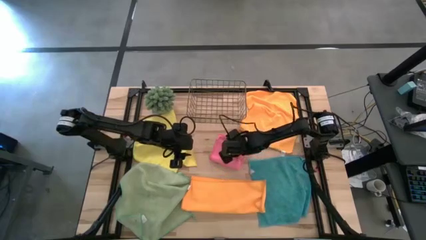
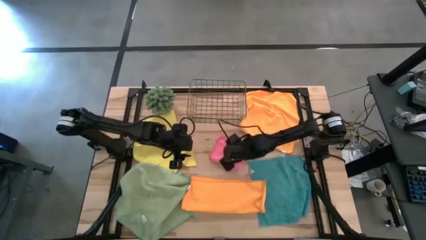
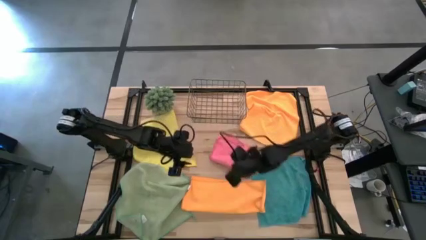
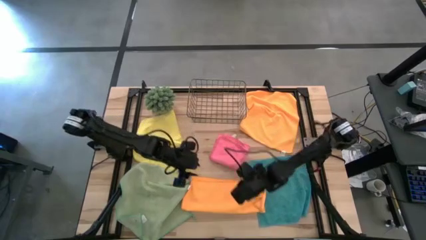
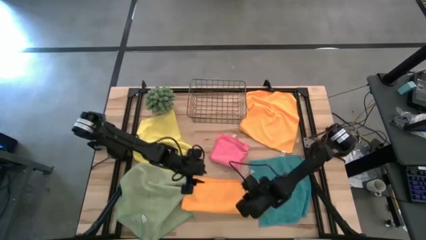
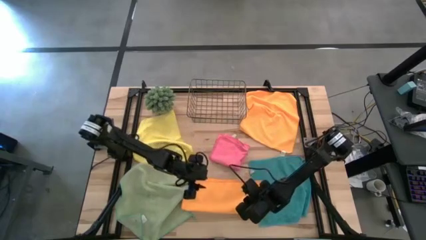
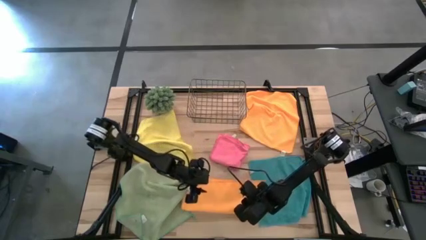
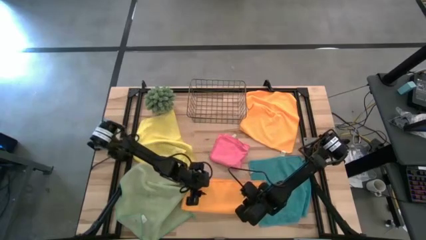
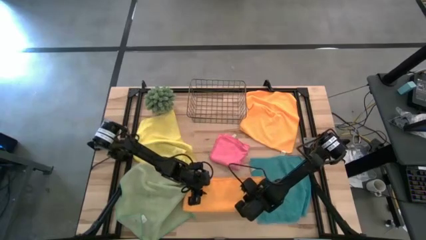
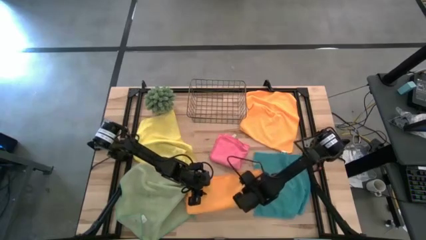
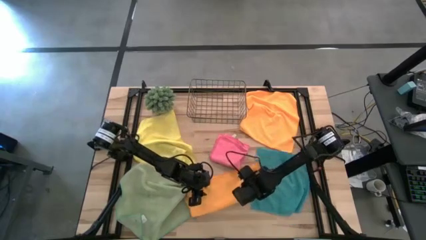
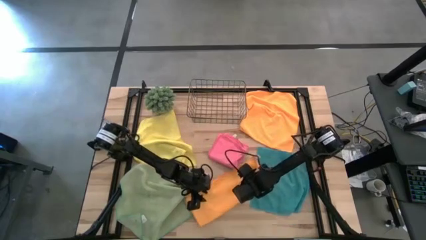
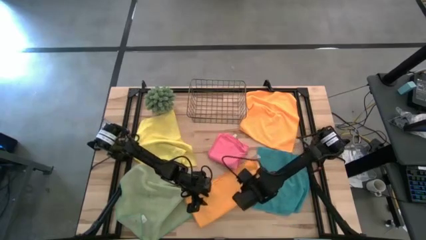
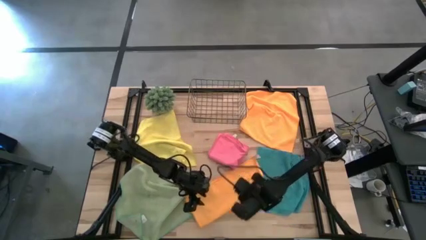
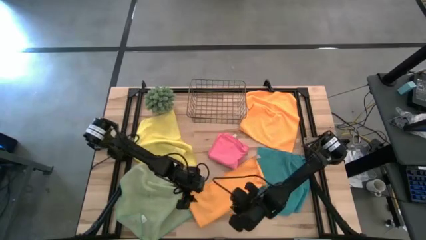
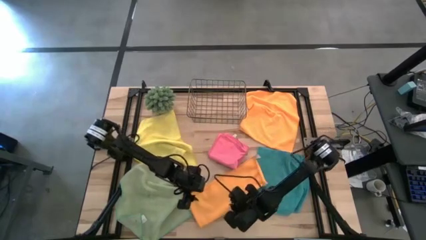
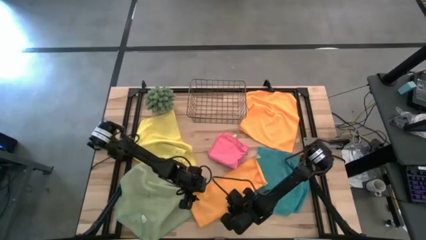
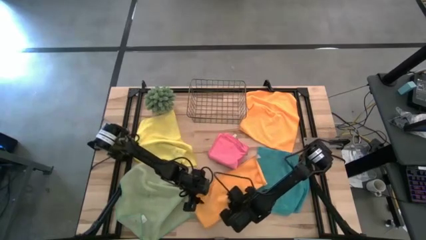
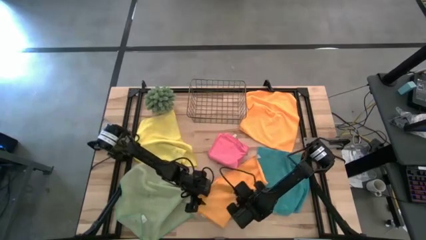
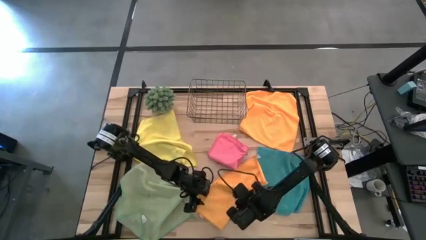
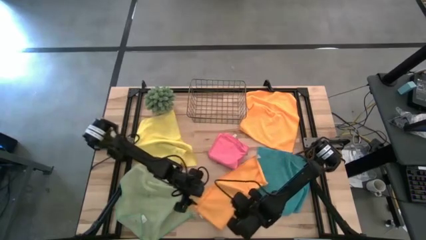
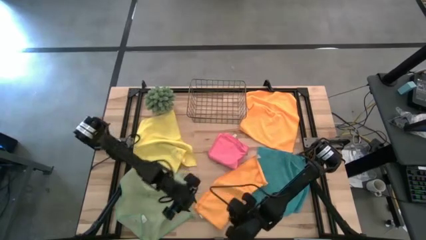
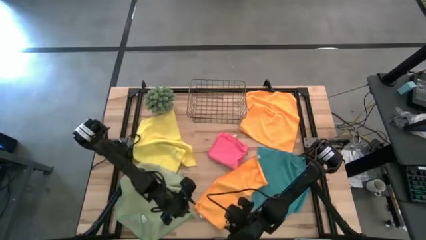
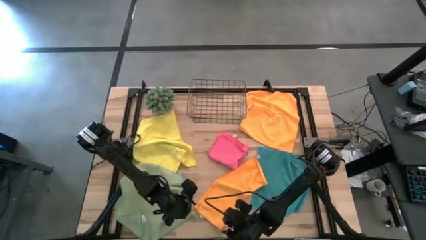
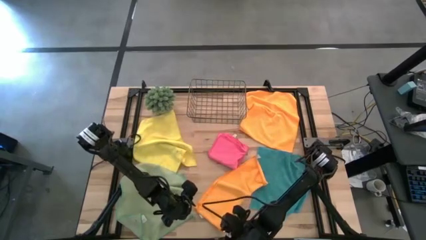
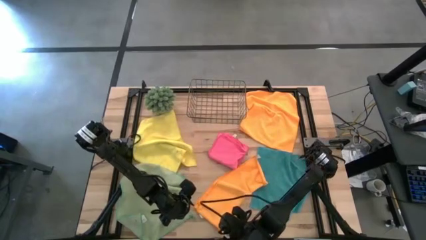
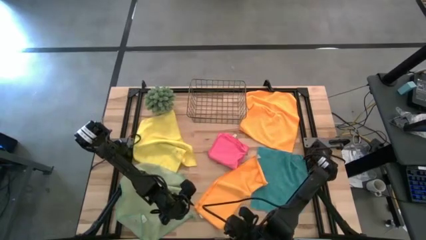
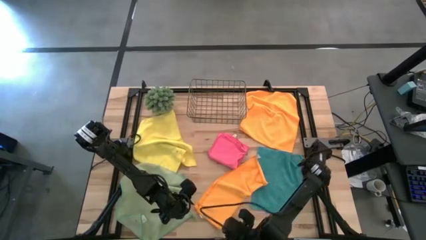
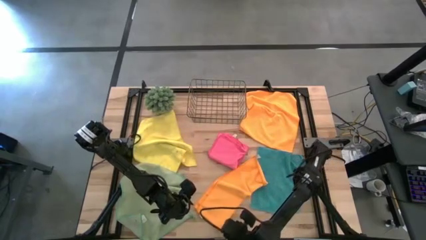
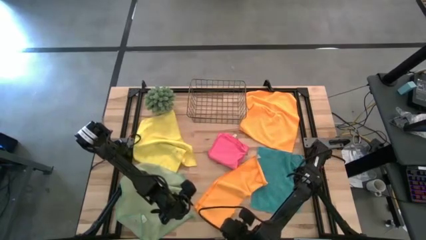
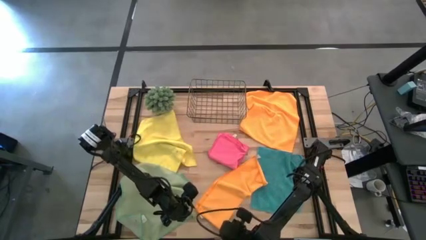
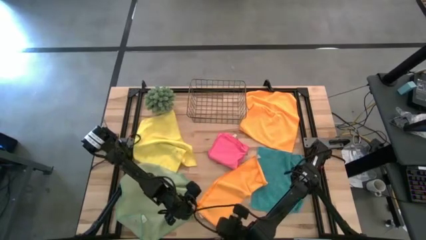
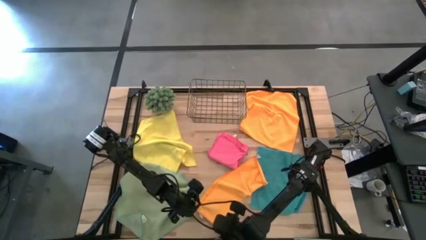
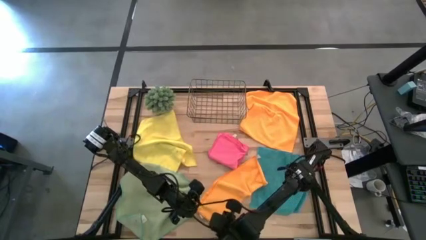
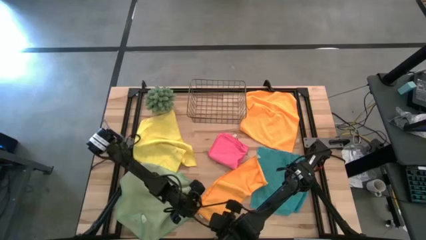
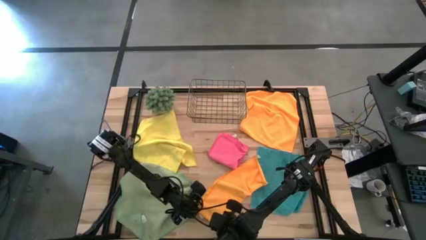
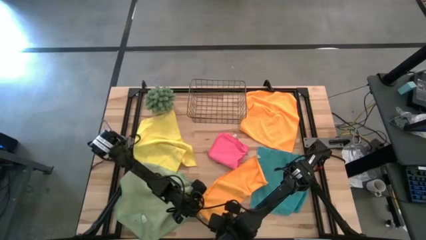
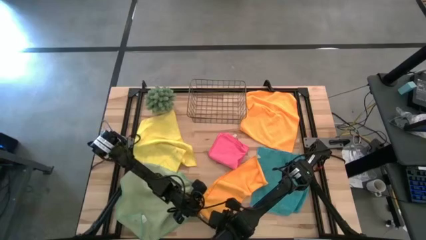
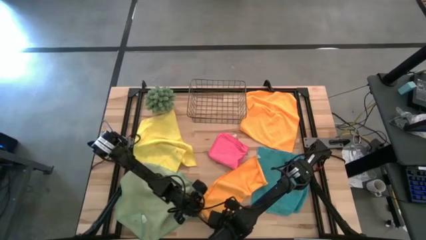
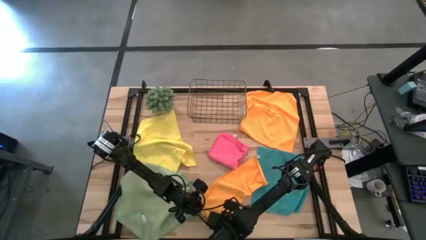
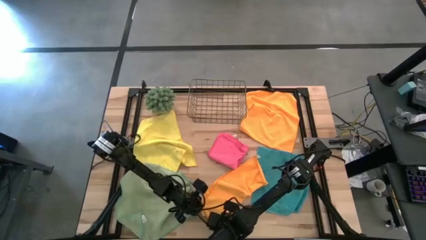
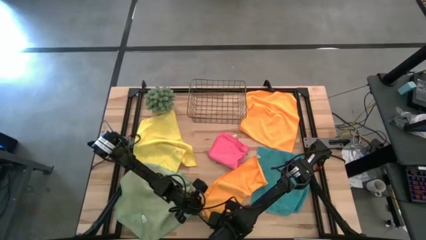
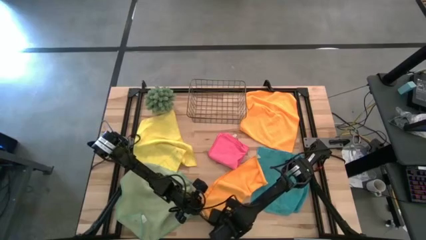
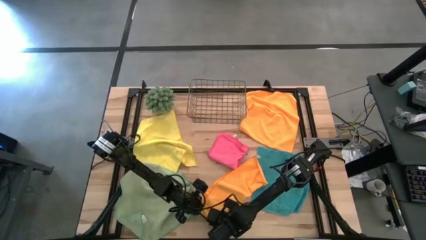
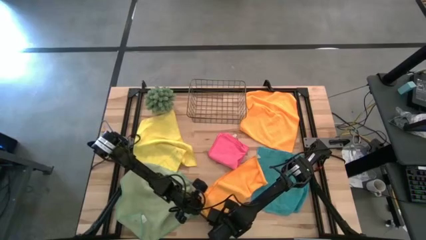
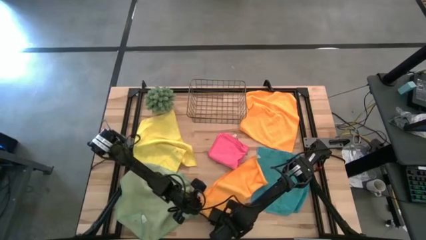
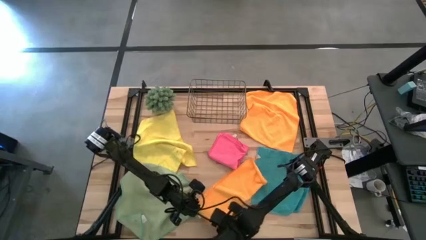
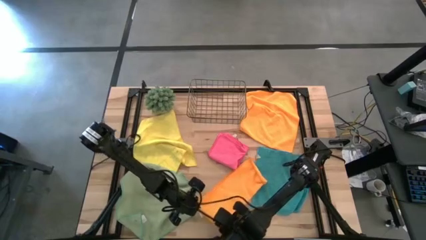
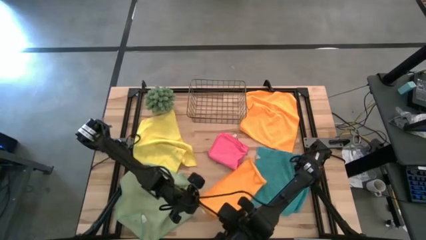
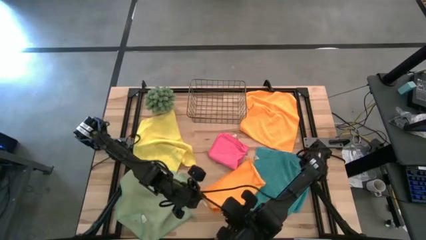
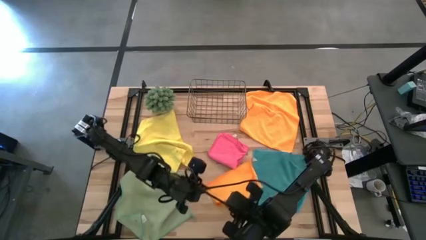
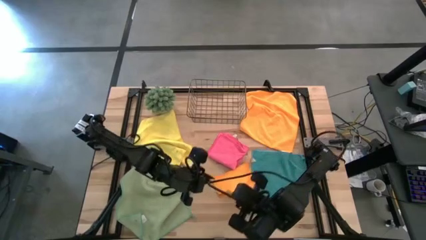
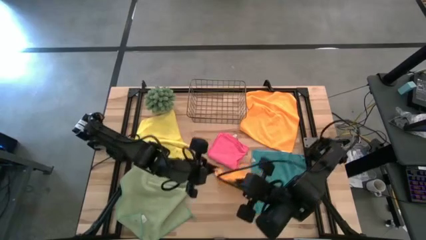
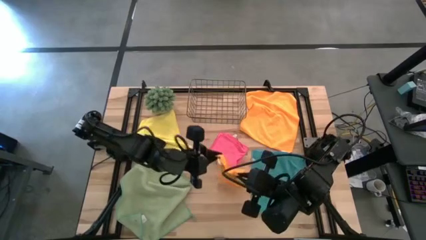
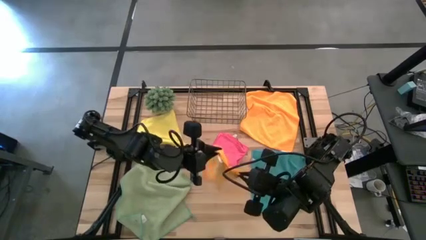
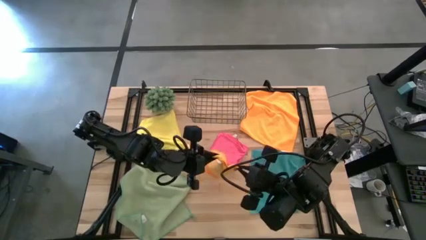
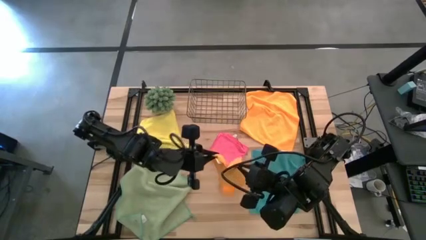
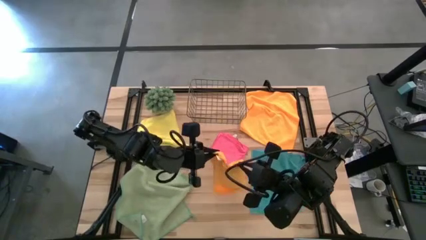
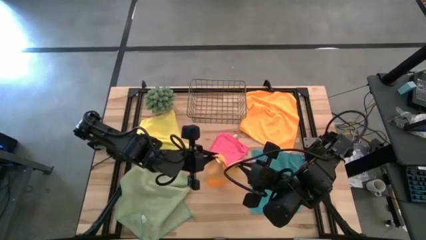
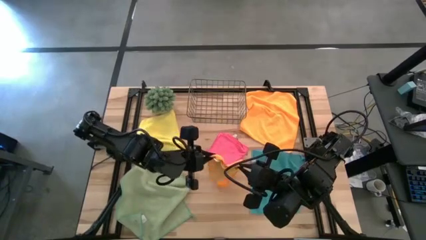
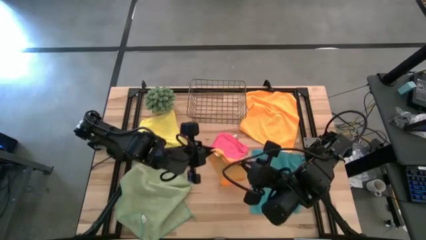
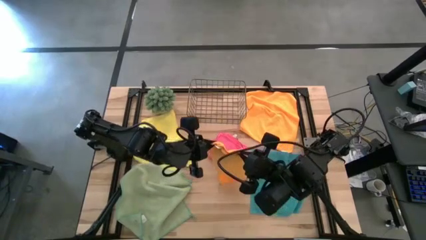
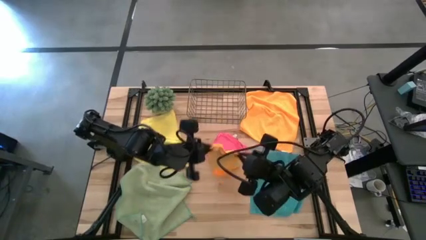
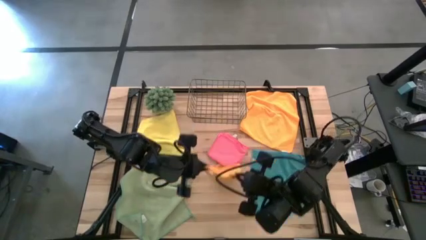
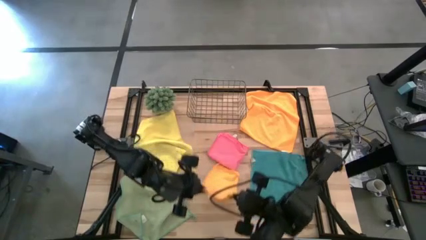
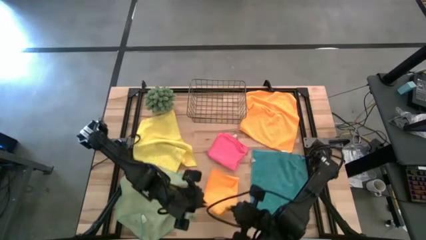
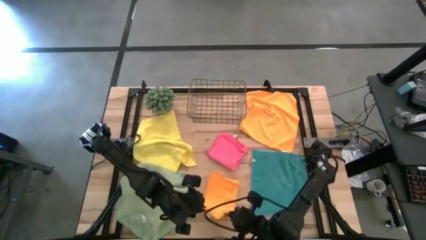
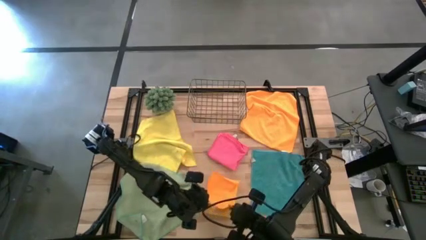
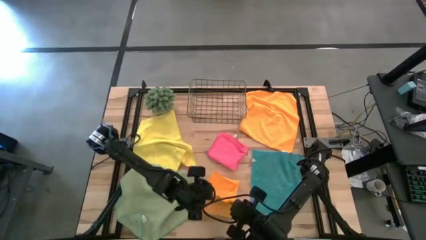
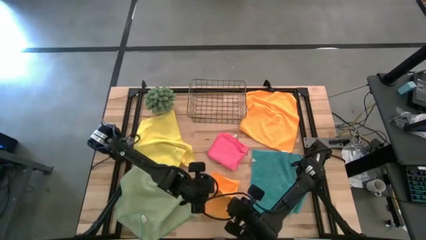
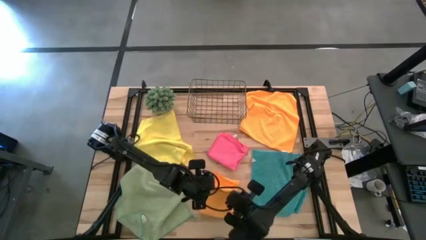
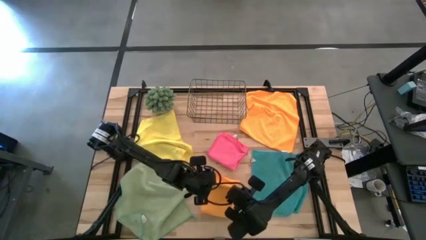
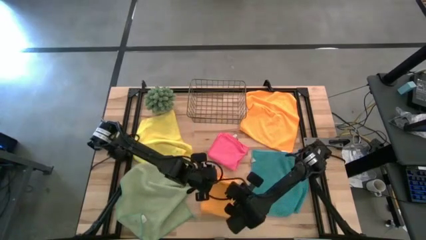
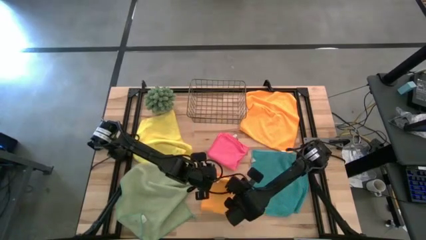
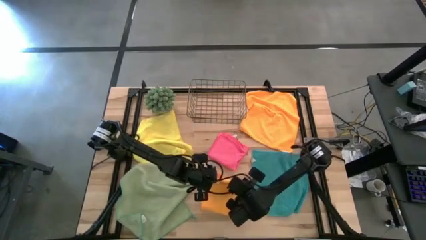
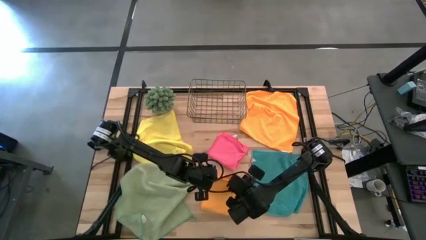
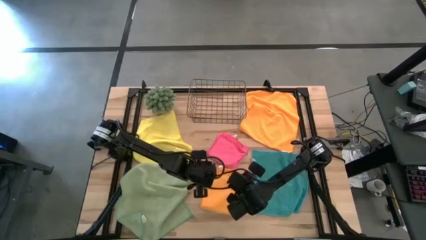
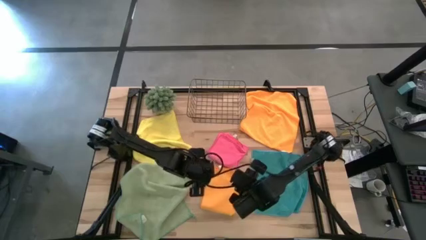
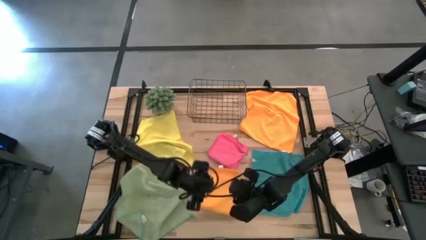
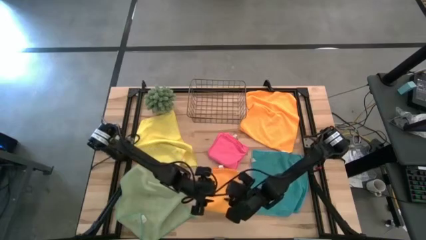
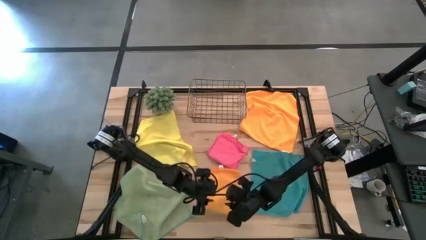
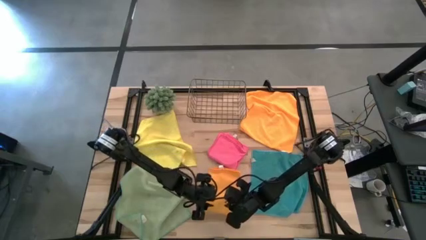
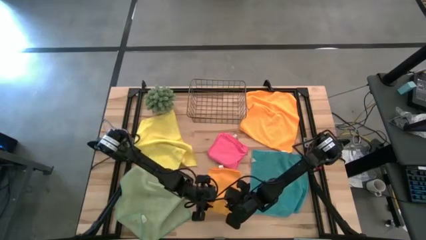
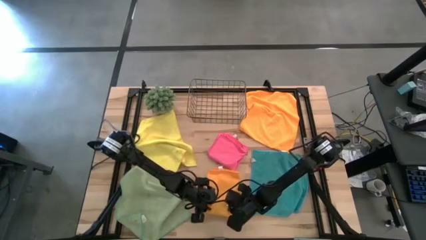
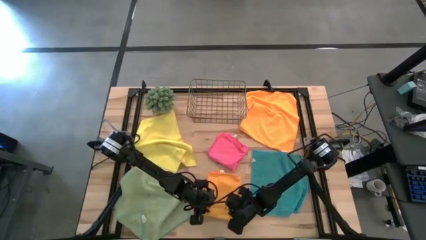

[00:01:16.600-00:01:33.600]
Task: Fold microfiber towels
Fold the bottom orange microfiber towel
